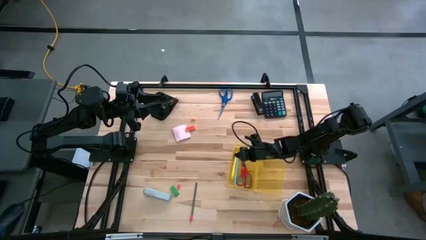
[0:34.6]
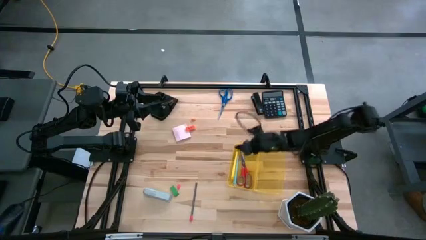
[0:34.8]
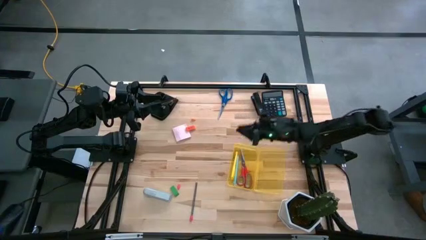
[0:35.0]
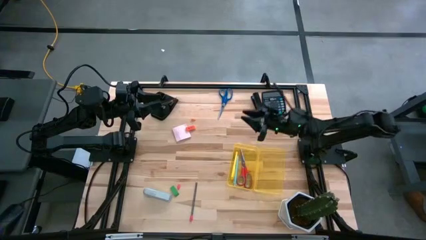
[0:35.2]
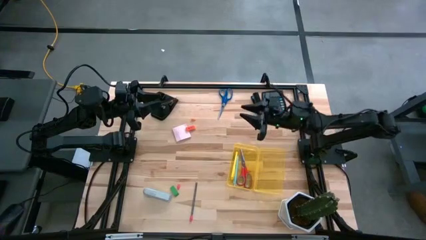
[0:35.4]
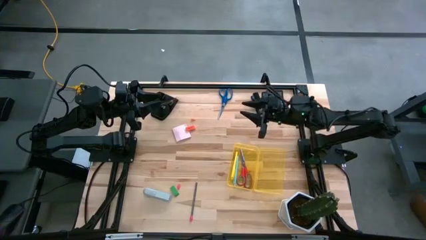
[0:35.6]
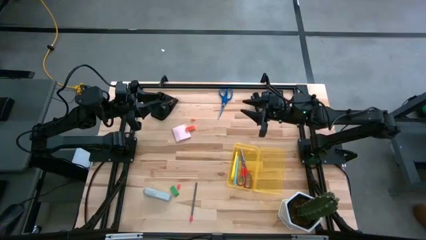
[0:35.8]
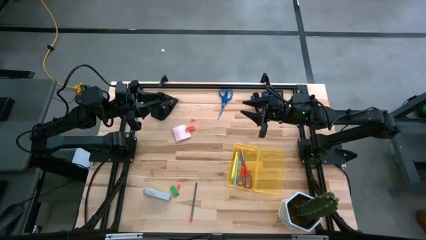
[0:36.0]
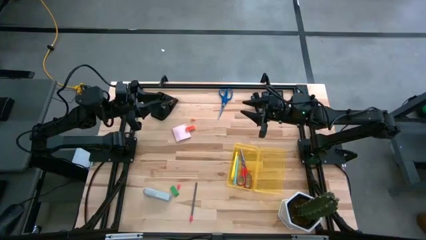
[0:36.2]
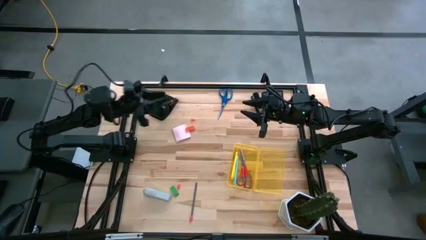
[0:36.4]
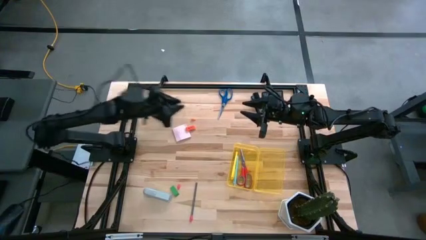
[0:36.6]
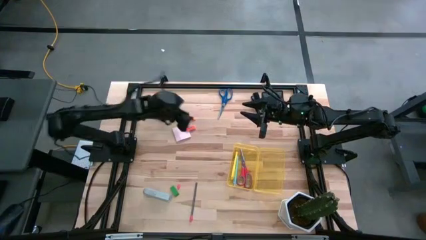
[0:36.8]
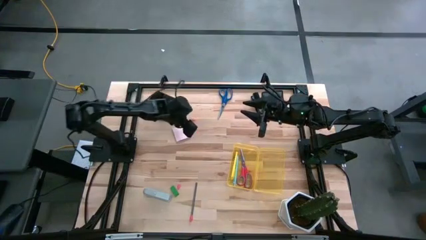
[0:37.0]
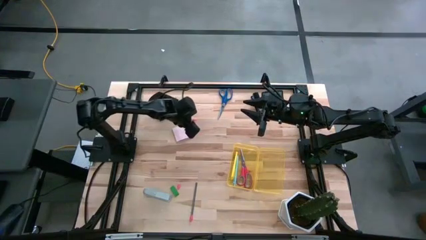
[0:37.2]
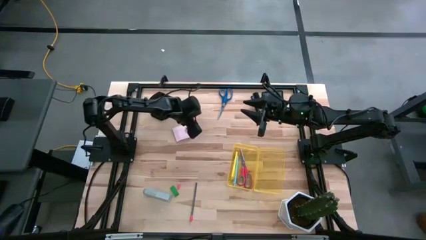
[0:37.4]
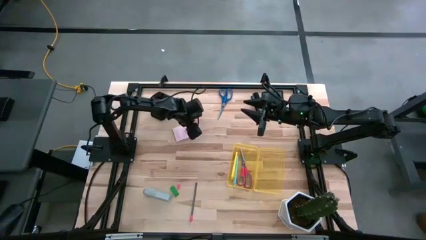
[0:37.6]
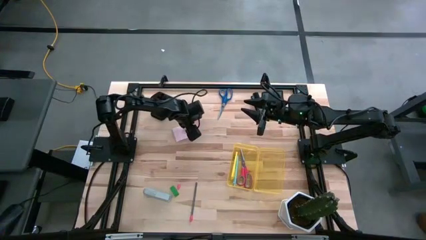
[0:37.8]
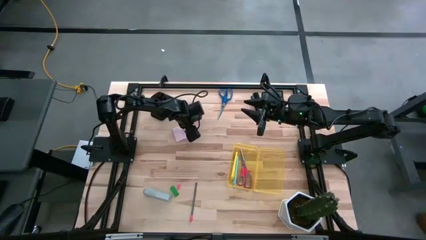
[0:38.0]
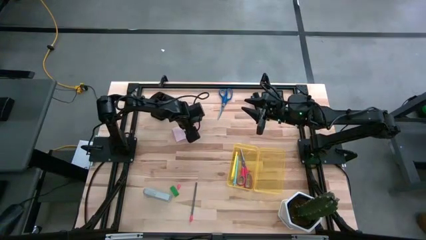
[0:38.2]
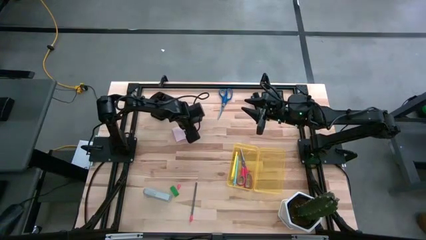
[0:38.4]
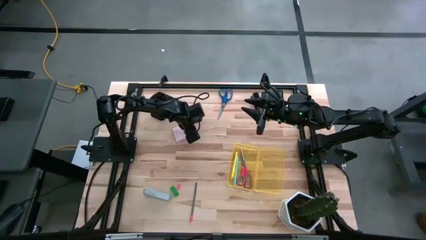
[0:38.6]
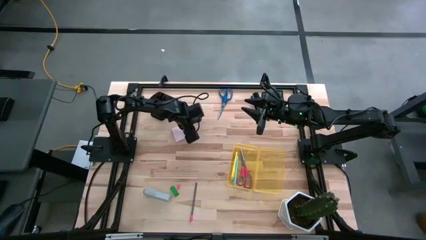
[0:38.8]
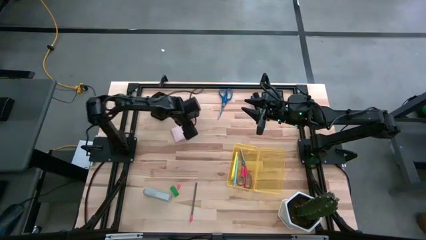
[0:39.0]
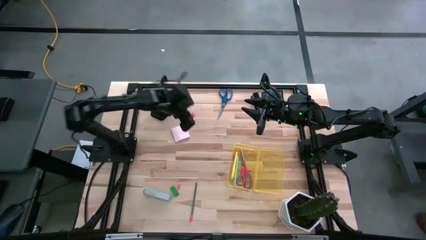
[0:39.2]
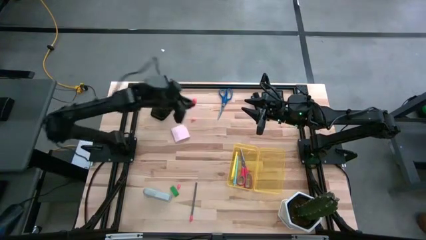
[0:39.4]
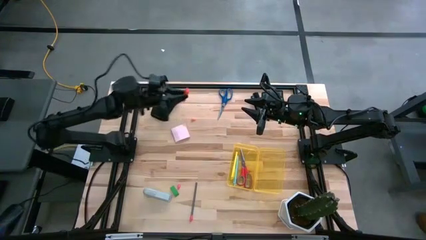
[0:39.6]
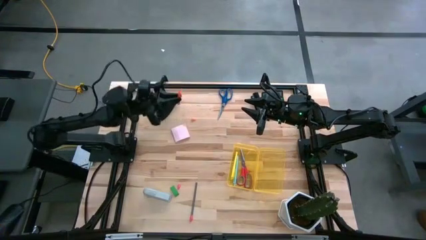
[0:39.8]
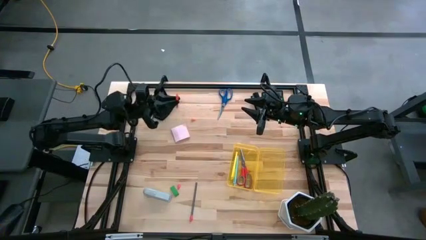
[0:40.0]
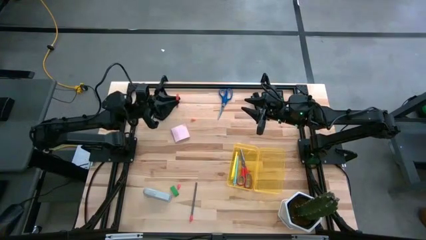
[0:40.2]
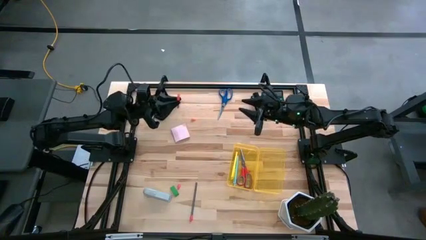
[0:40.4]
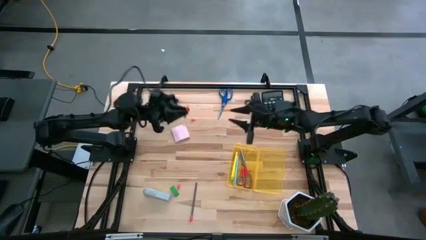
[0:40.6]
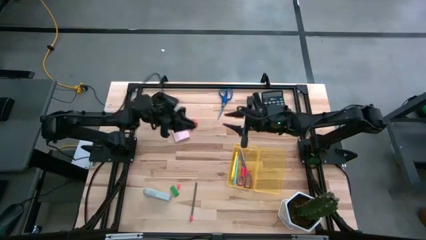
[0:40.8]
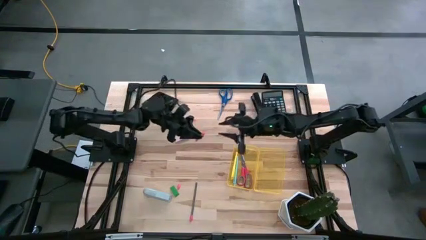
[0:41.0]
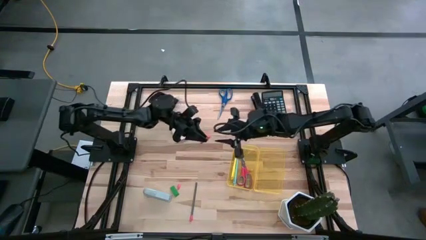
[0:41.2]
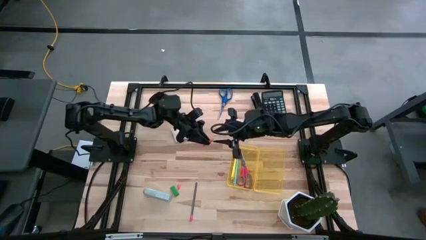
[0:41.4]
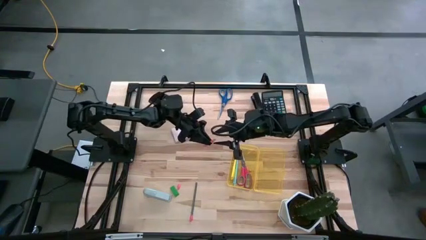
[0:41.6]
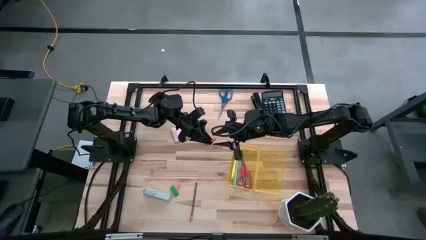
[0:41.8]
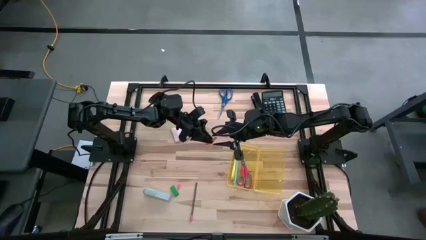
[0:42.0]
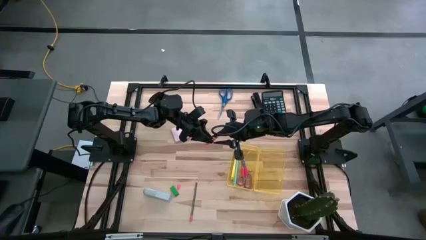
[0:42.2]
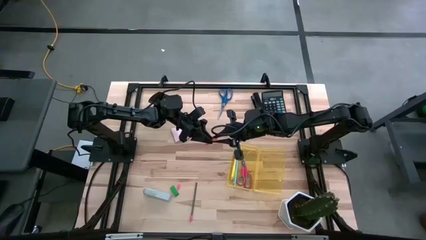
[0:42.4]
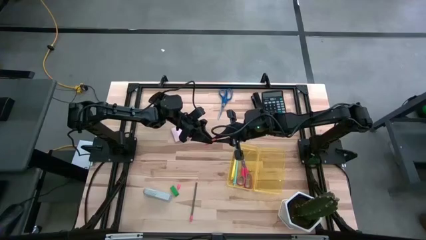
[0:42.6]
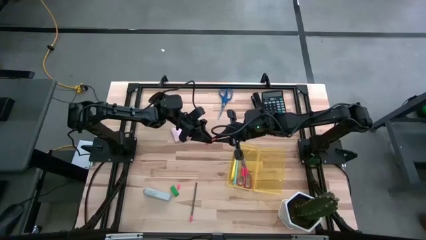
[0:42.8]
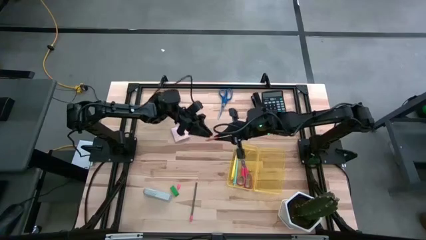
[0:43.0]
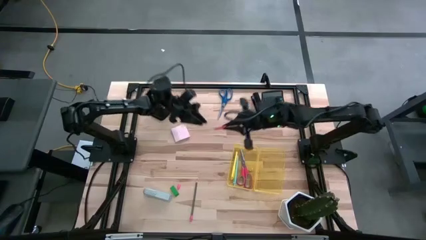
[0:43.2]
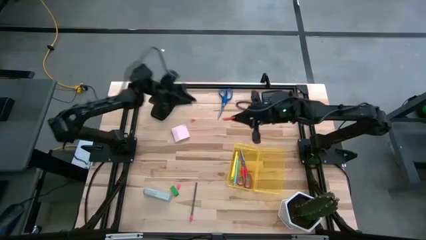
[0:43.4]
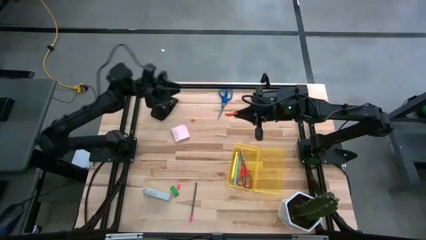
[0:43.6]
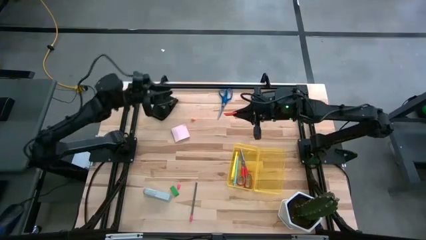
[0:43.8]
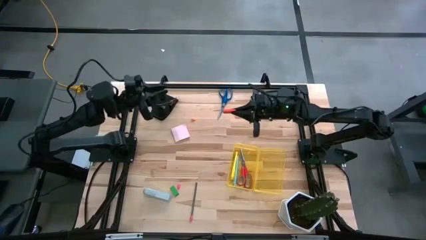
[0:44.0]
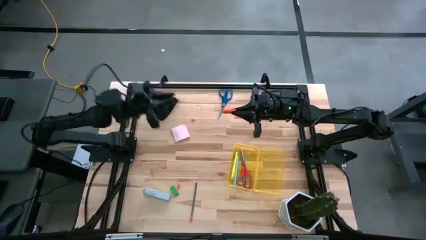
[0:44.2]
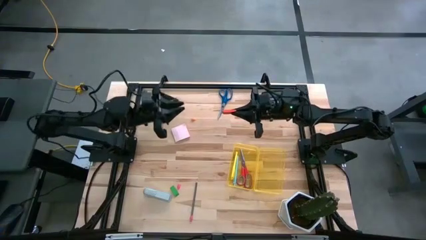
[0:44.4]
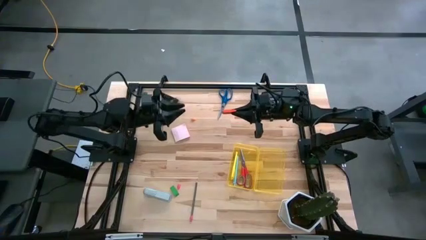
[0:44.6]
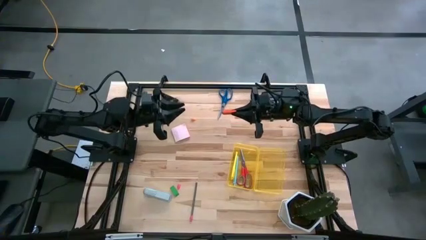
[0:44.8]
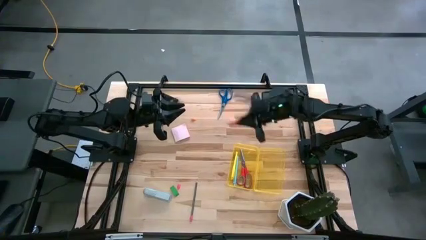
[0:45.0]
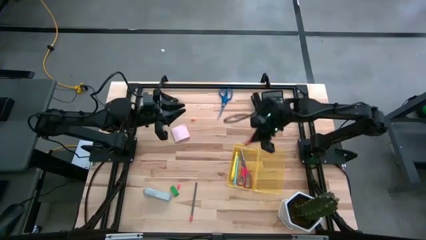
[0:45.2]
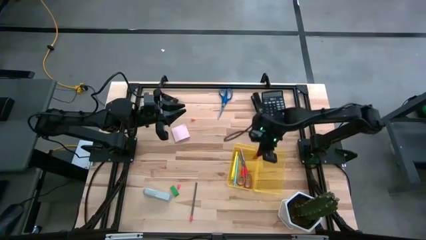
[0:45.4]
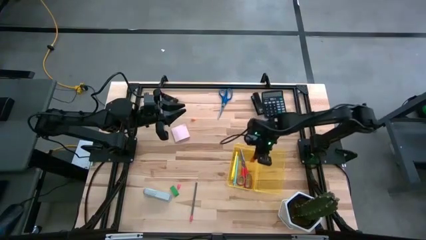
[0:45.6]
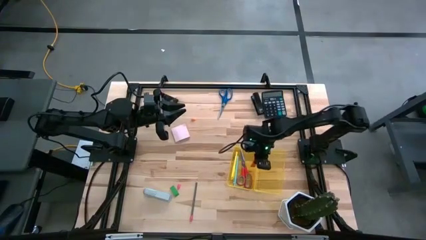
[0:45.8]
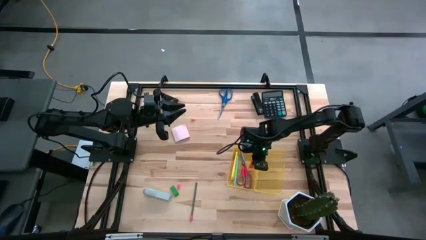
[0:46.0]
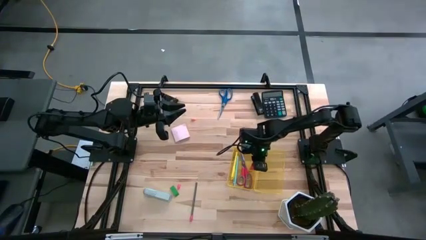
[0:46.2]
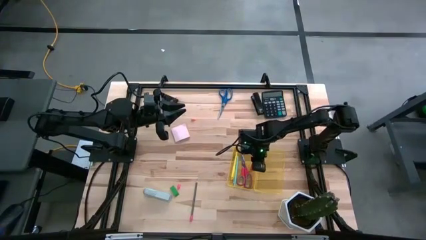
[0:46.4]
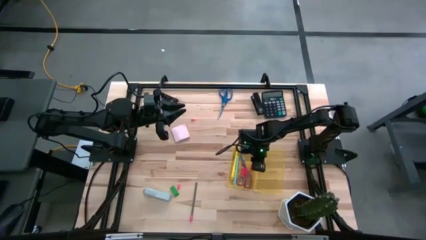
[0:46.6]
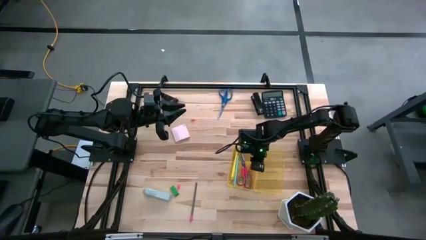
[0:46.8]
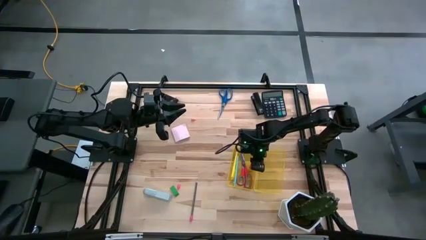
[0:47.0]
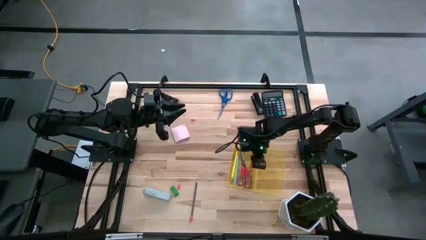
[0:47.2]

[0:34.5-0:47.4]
Task: Pack school essentials
Put the large orange eraser into the supply box
